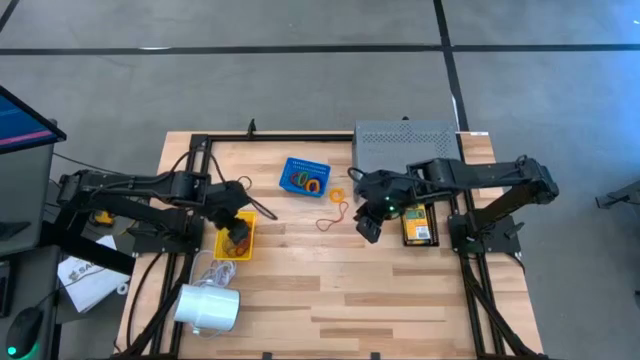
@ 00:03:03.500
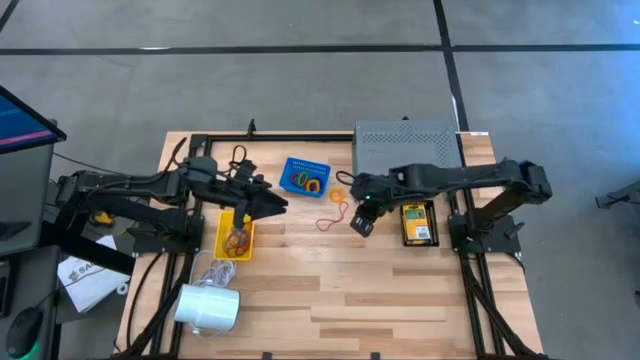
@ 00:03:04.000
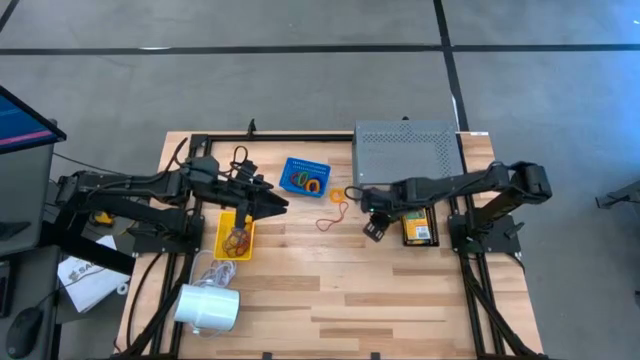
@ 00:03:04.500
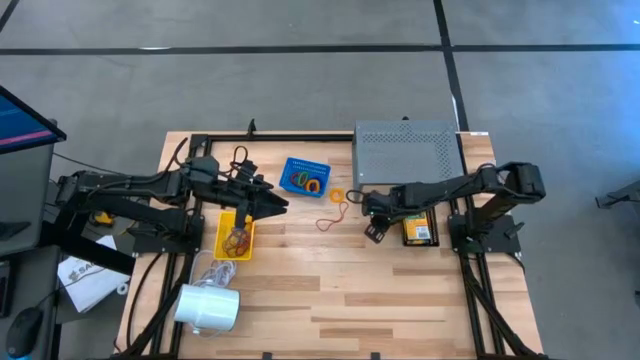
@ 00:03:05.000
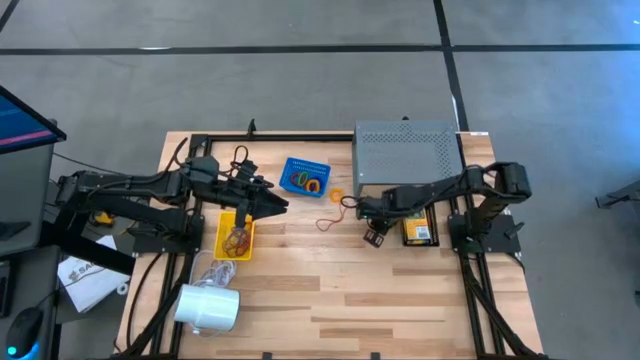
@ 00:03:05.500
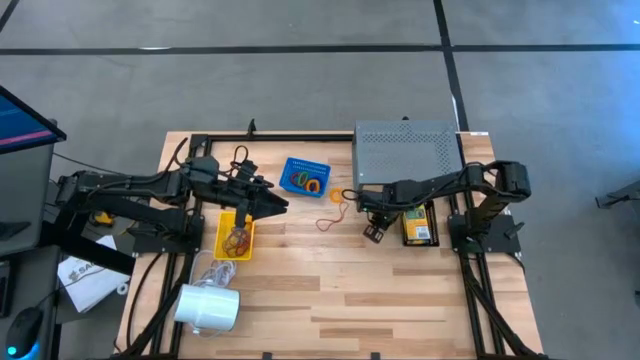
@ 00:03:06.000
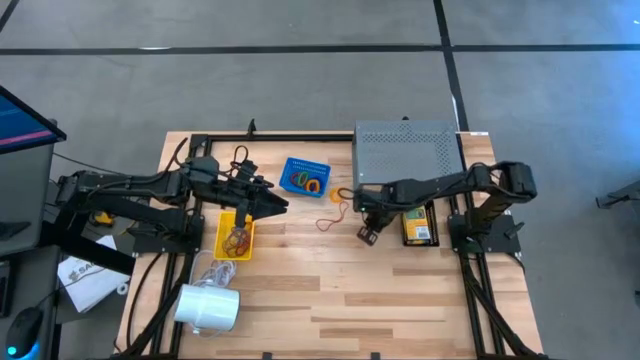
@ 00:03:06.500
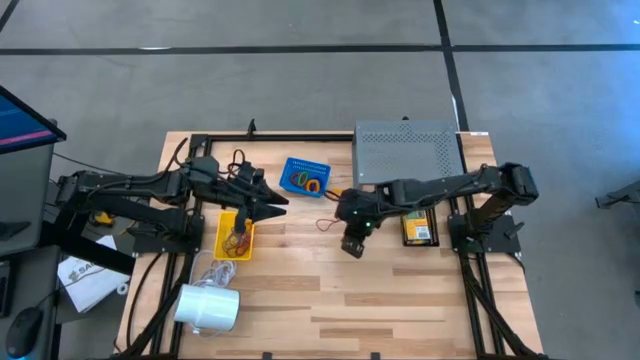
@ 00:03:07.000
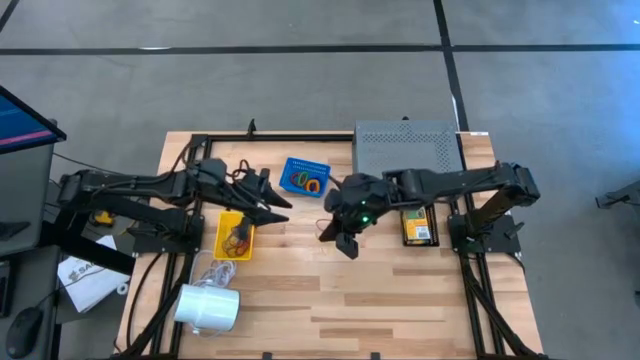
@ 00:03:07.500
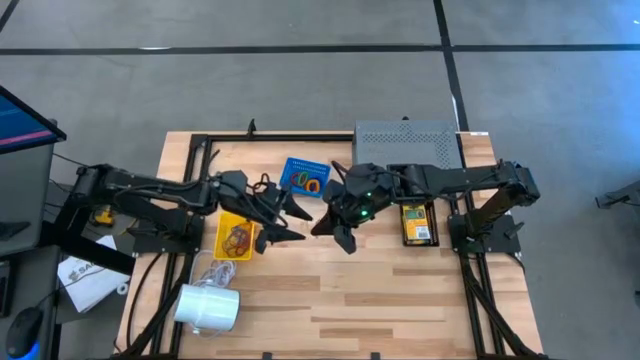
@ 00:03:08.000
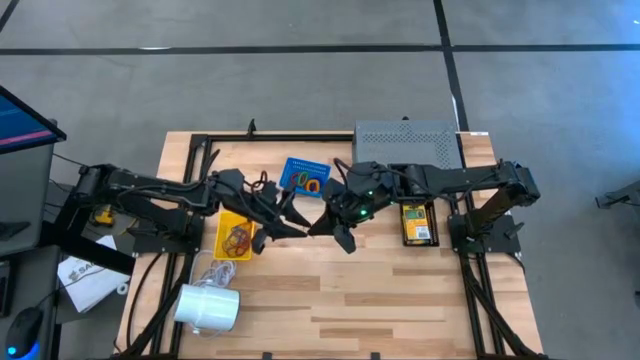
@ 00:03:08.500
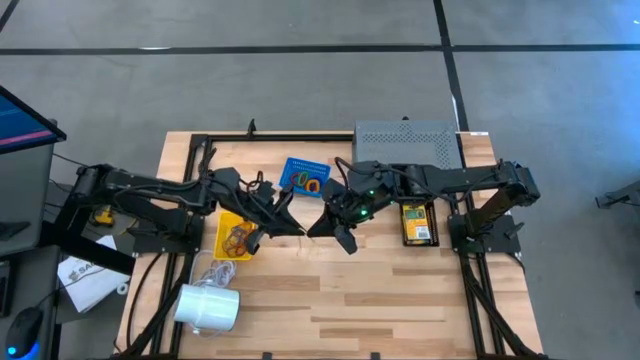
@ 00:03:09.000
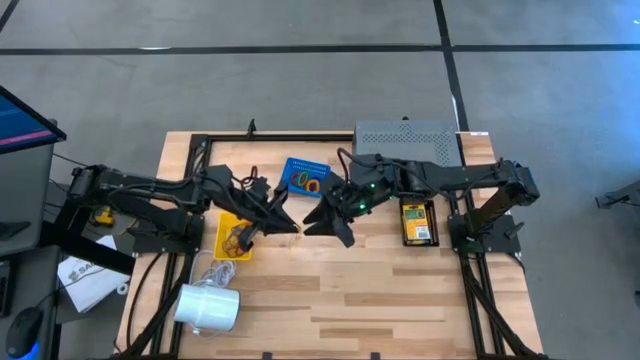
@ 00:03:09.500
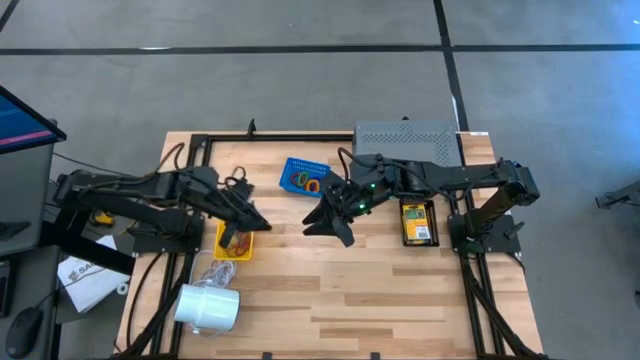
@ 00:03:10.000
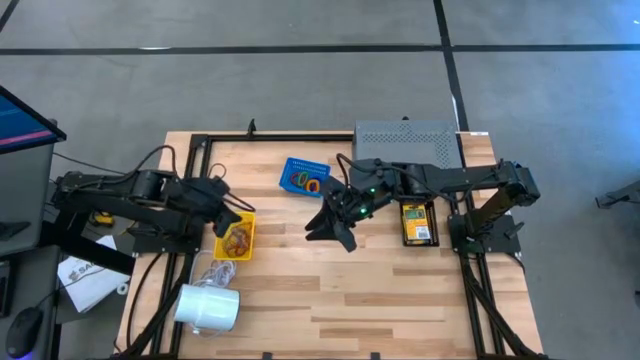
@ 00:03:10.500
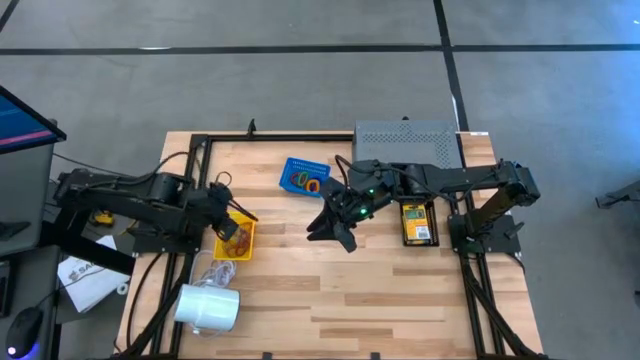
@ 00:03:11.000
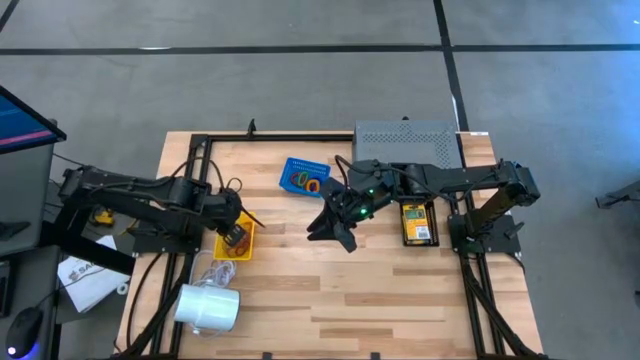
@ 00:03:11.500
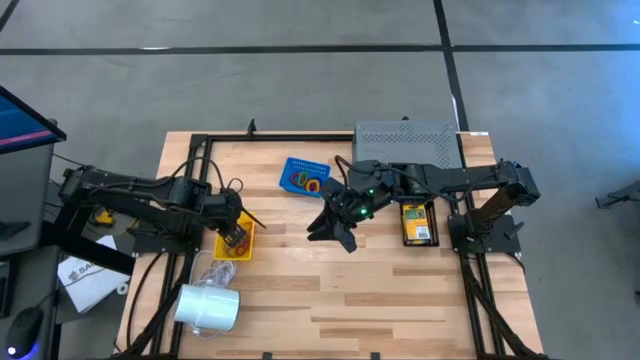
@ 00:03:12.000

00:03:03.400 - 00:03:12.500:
Task: Pick & Place Office Desk Supplies
Put the yellow rubber band into the yellow bin

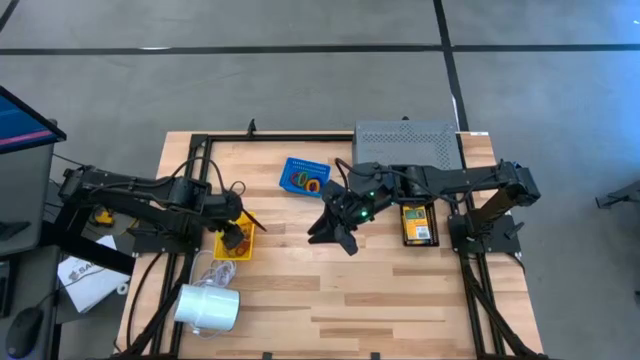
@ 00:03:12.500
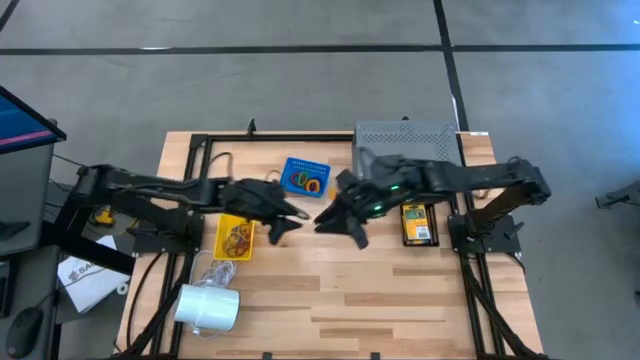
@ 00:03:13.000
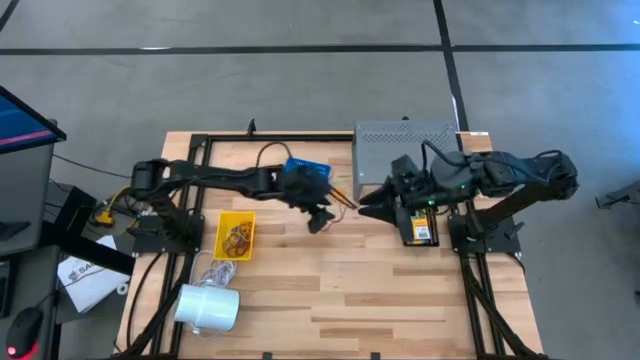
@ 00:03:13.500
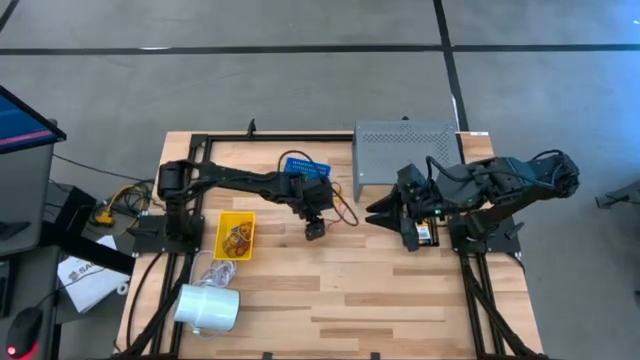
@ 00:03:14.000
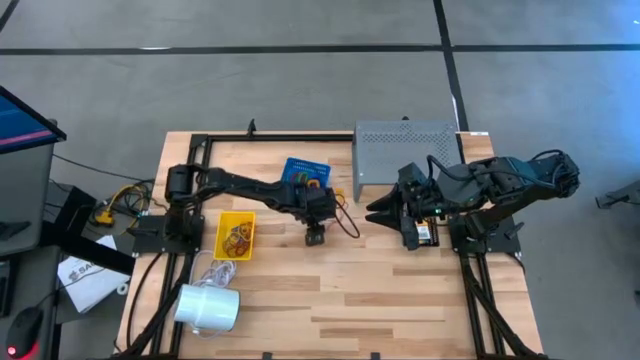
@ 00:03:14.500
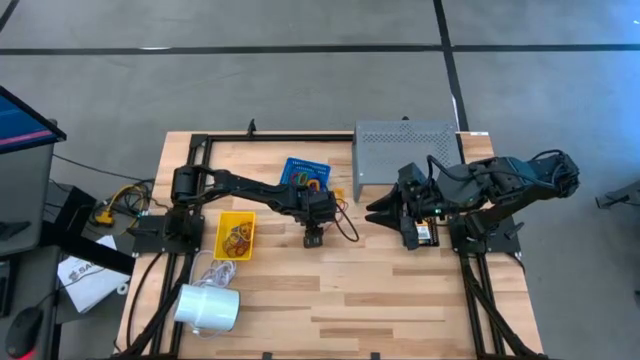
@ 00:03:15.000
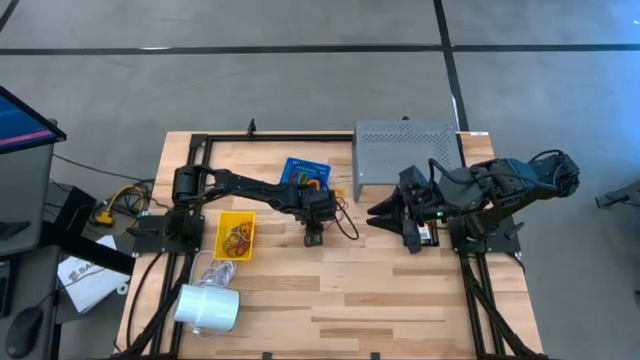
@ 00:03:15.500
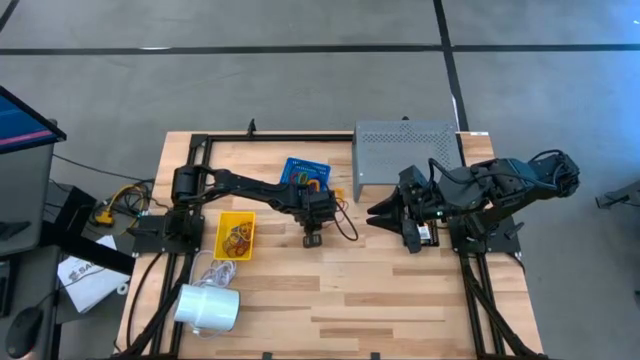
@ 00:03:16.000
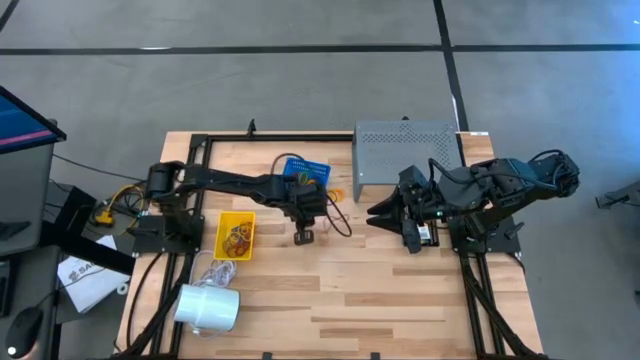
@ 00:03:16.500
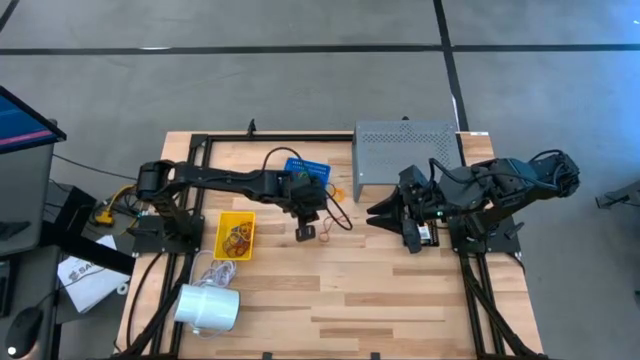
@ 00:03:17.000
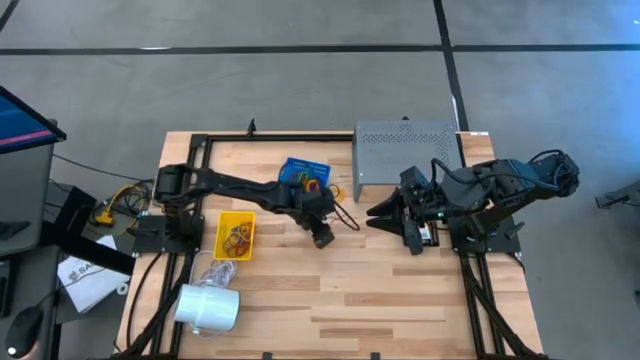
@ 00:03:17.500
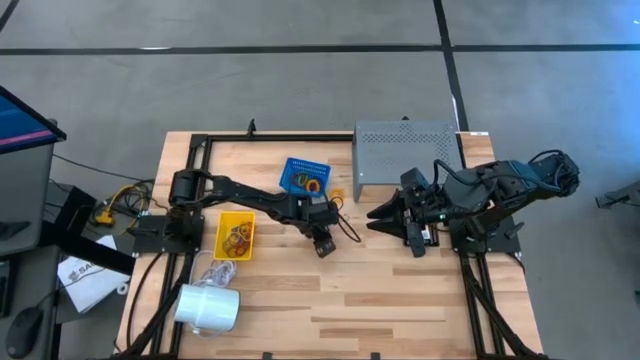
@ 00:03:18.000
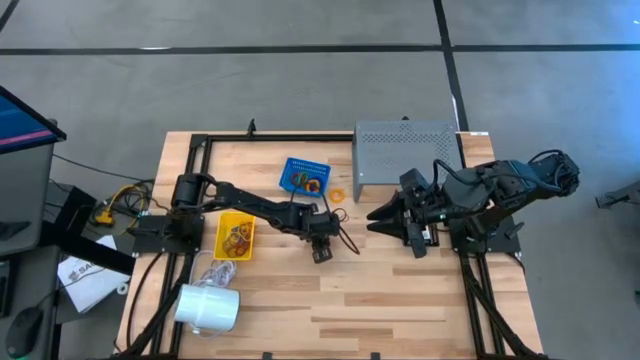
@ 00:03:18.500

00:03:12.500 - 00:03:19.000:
Put the red rubber band into the yellow bin

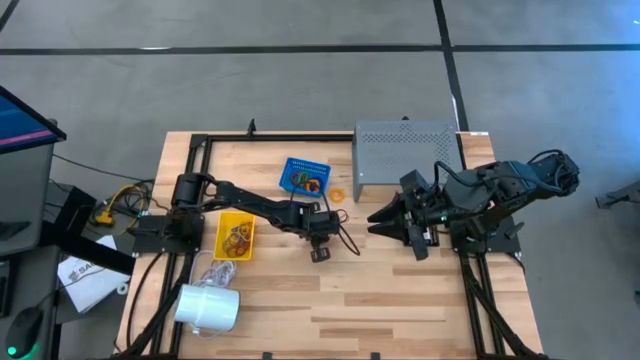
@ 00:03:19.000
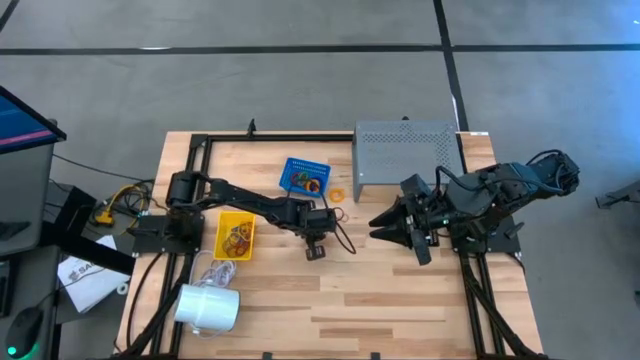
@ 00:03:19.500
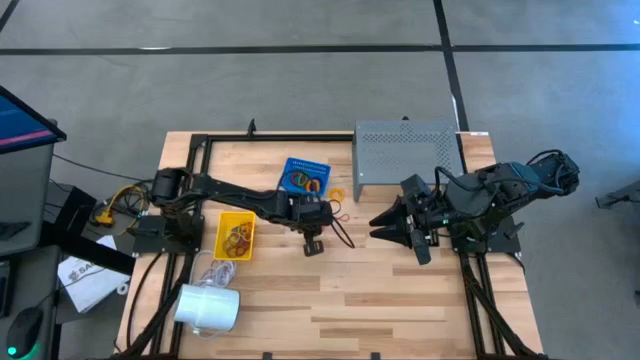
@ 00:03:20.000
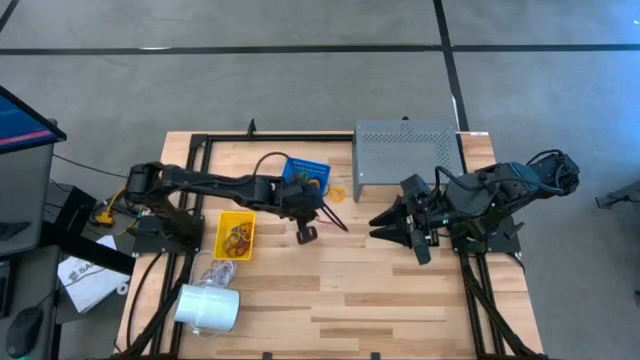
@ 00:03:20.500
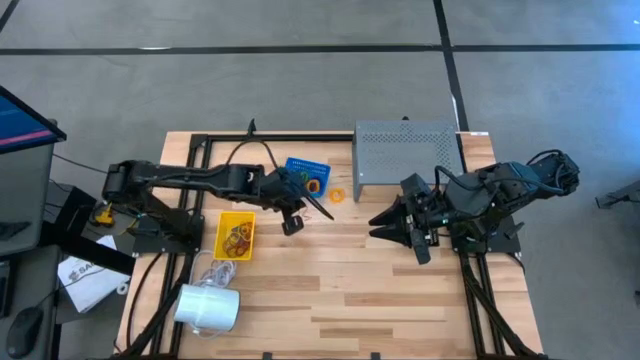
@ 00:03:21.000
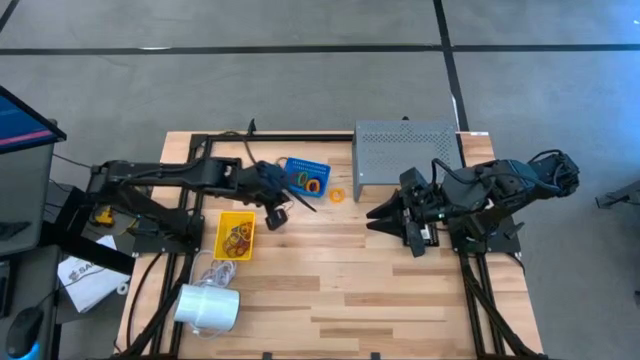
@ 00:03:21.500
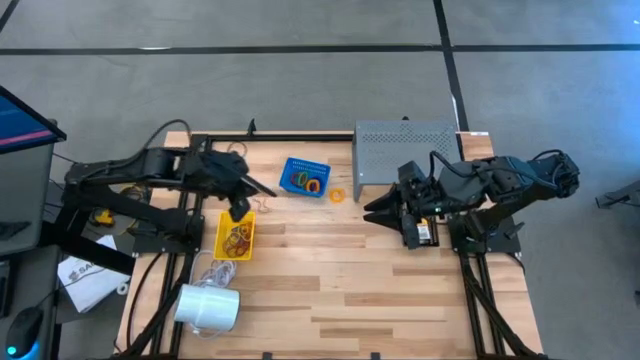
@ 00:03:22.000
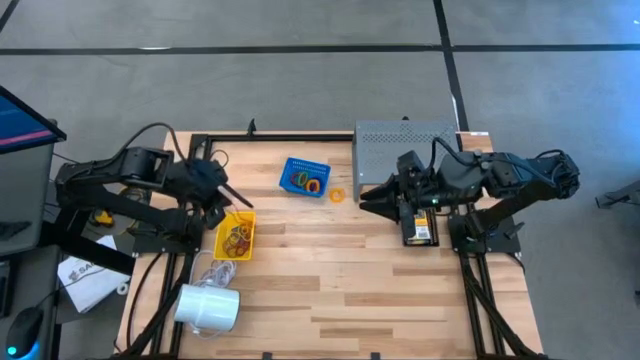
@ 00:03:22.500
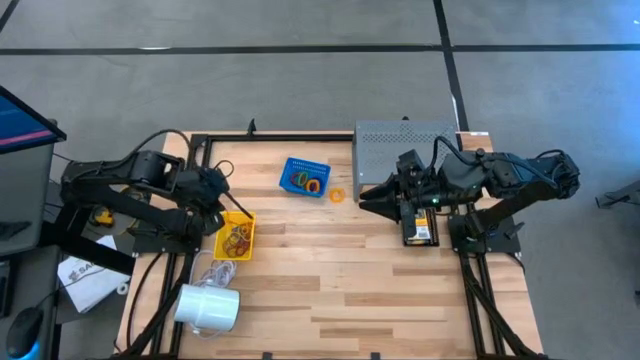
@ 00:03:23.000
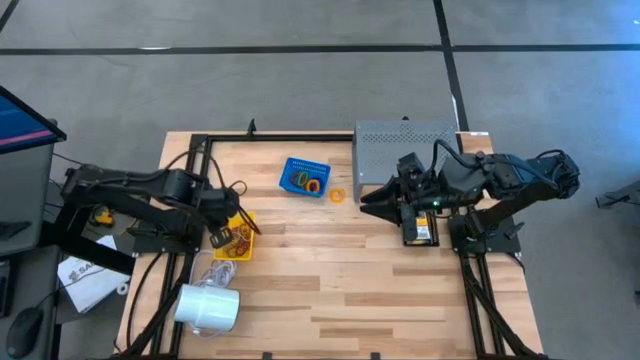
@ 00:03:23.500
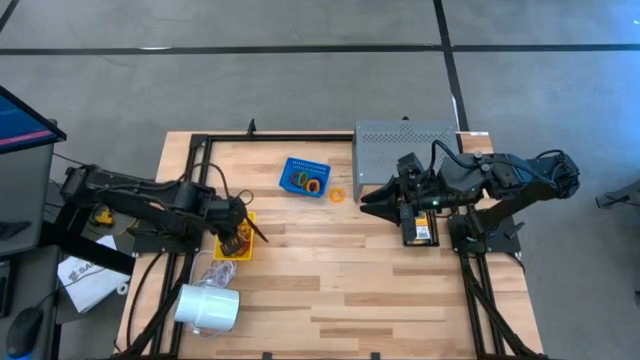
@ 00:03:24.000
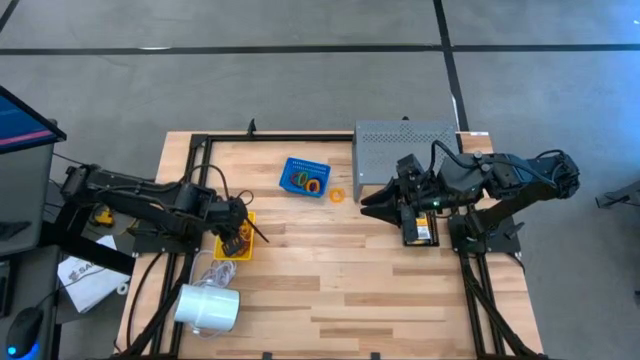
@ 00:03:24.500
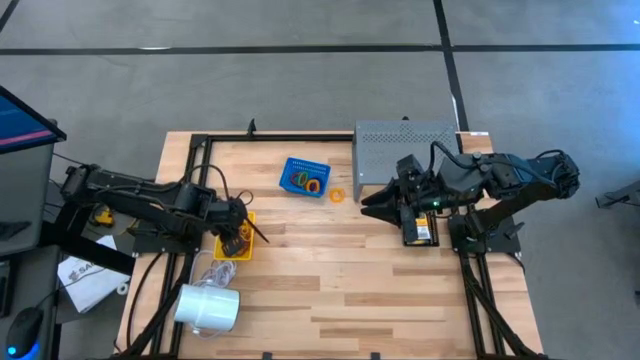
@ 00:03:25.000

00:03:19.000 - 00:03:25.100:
Put the red rubber band into the yellow bin
